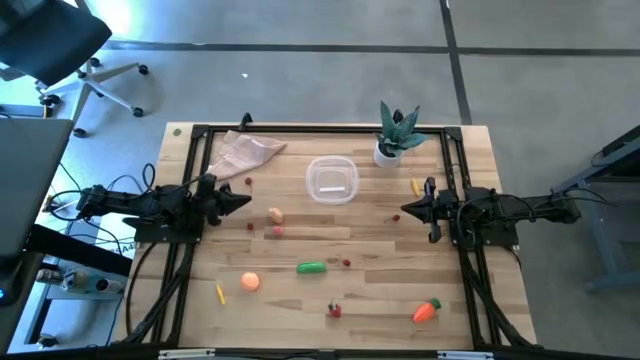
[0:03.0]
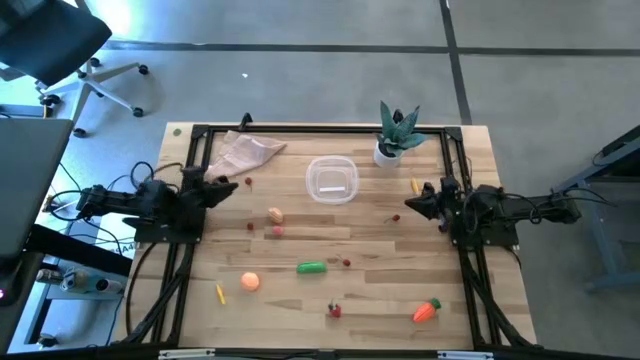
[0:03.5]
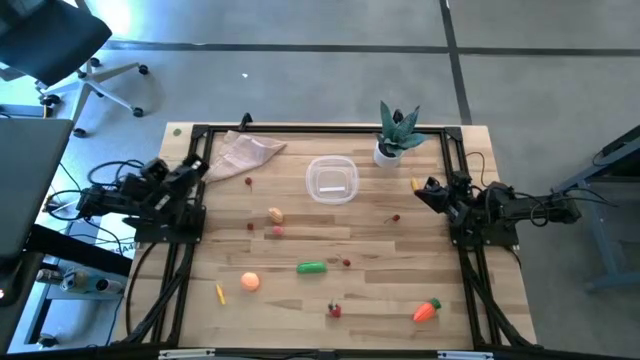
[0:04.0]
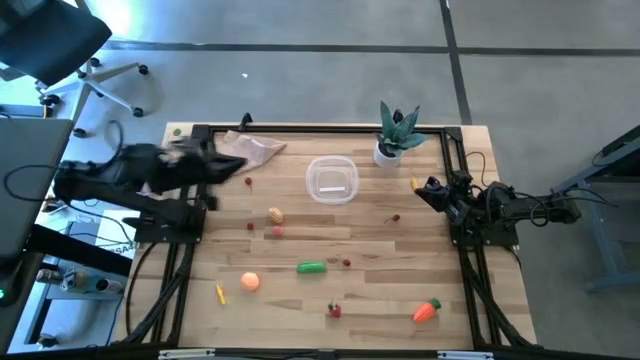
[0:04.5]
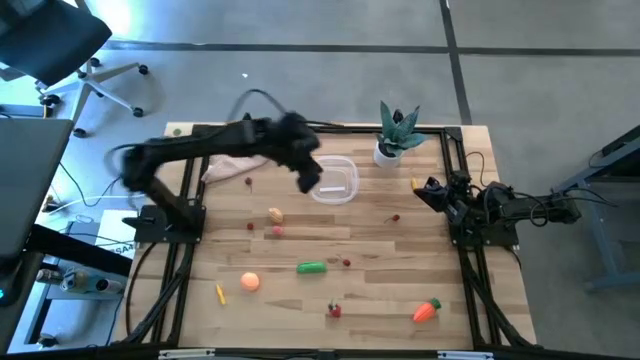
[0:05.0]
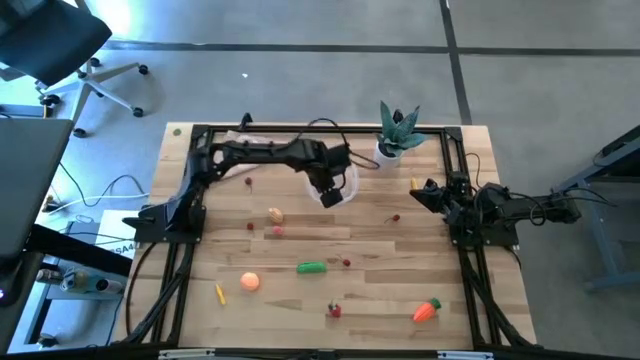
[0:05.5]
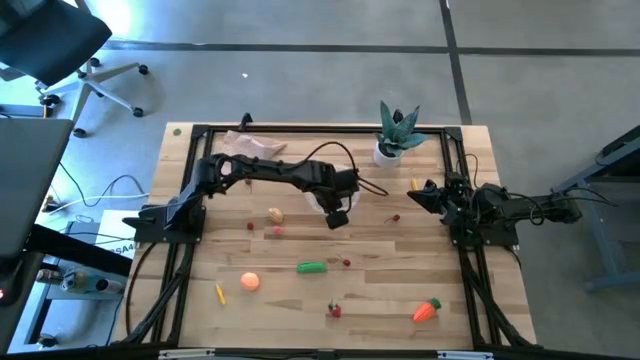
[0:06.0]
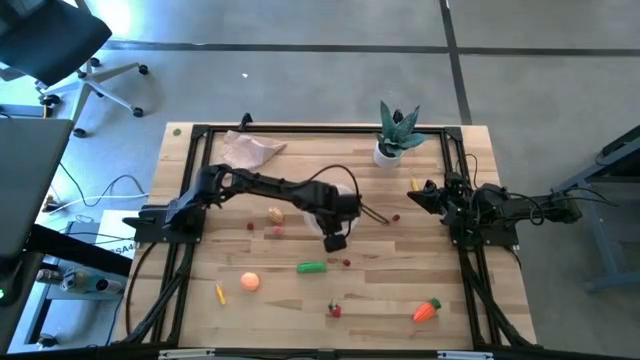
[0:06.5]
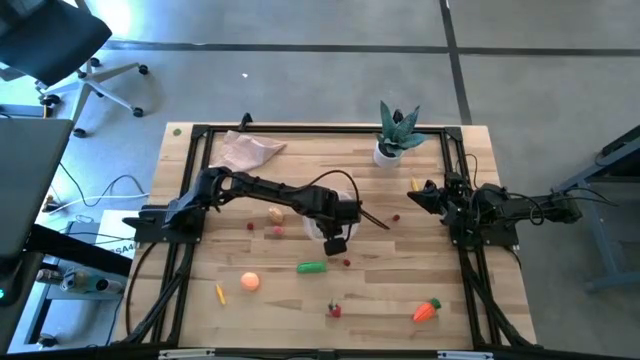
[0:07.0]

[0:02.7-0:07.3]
Task: Pick and placing Produce into tupperware
Adjust the transparent bin

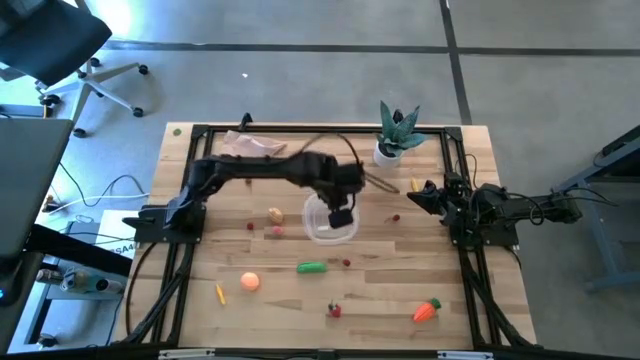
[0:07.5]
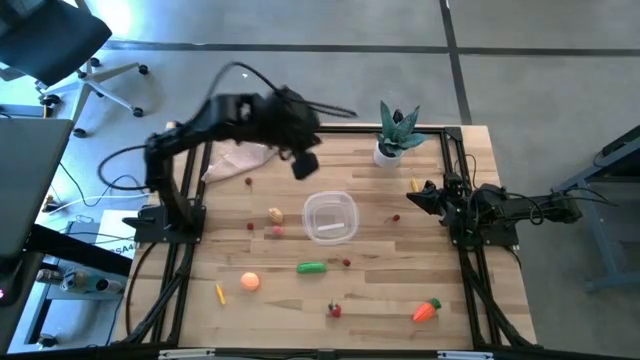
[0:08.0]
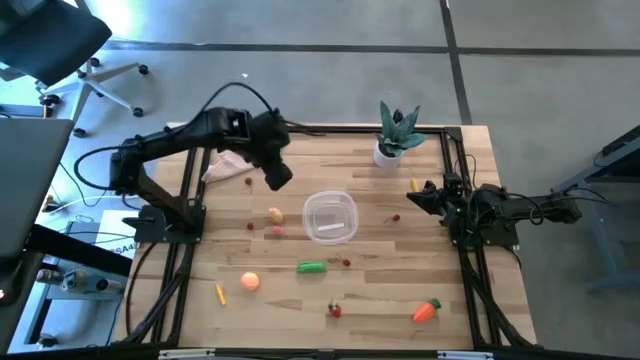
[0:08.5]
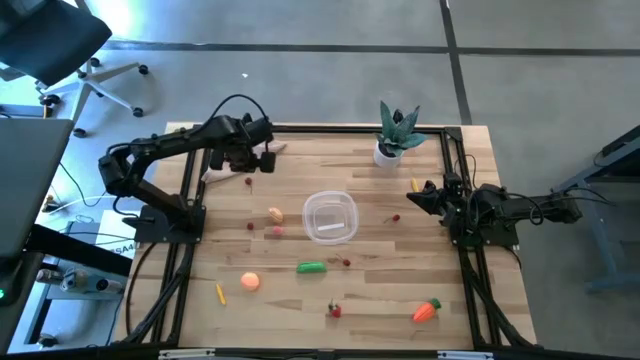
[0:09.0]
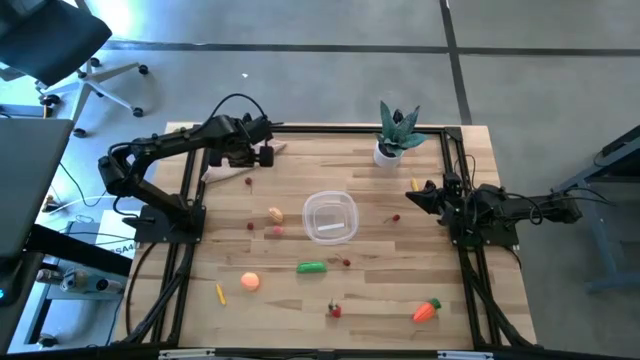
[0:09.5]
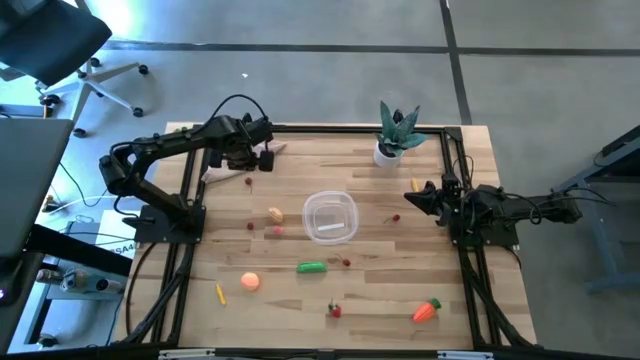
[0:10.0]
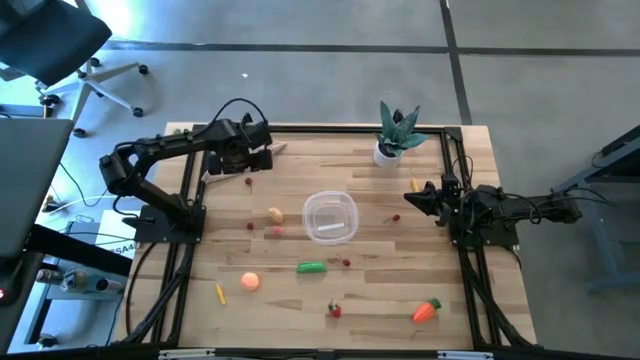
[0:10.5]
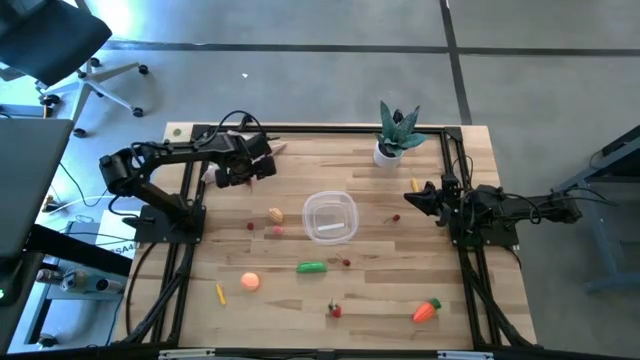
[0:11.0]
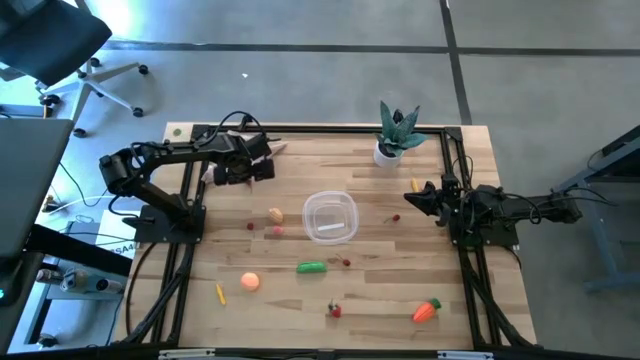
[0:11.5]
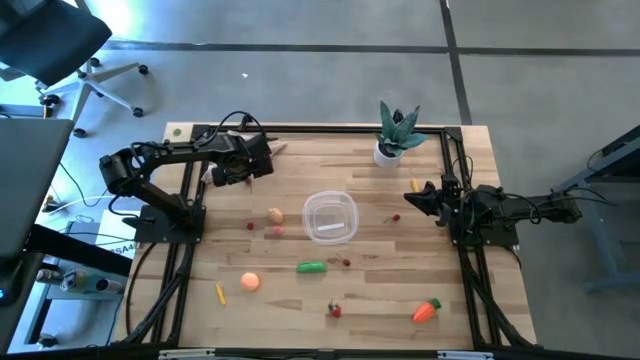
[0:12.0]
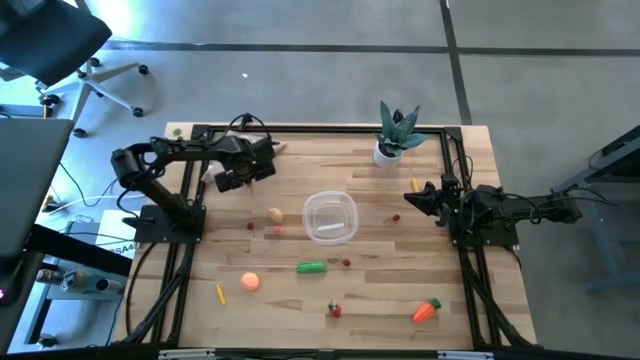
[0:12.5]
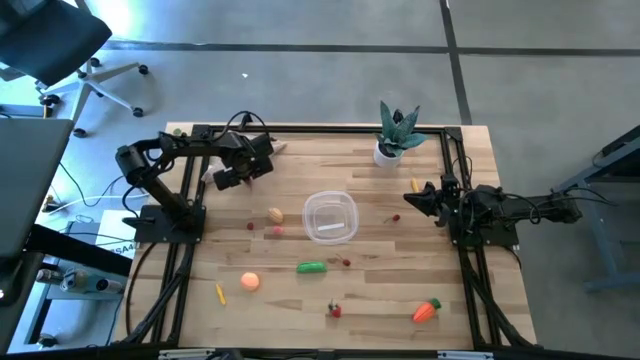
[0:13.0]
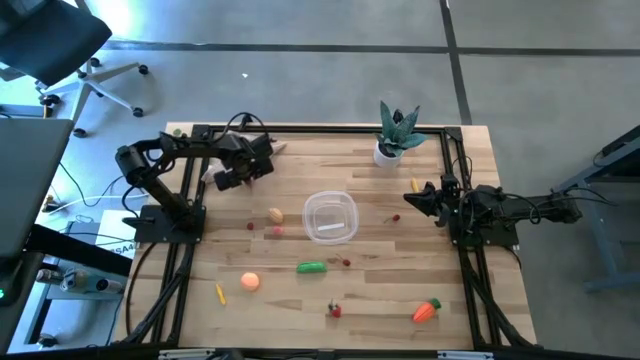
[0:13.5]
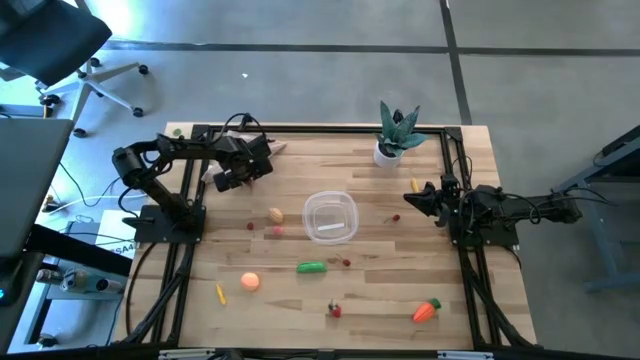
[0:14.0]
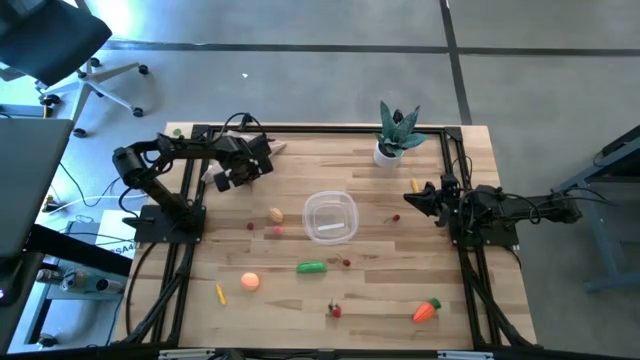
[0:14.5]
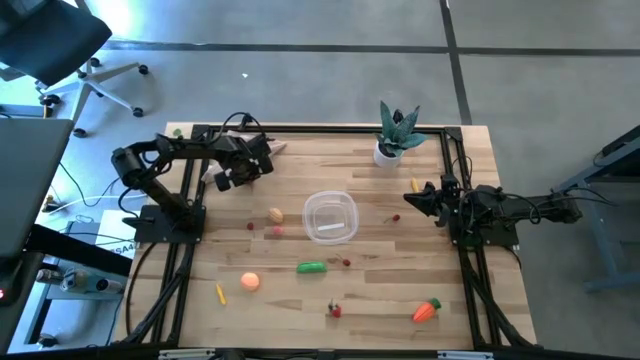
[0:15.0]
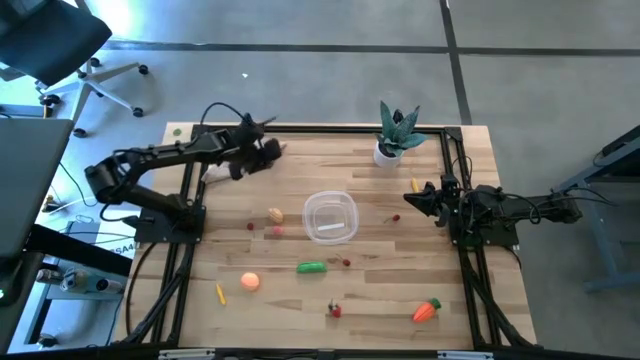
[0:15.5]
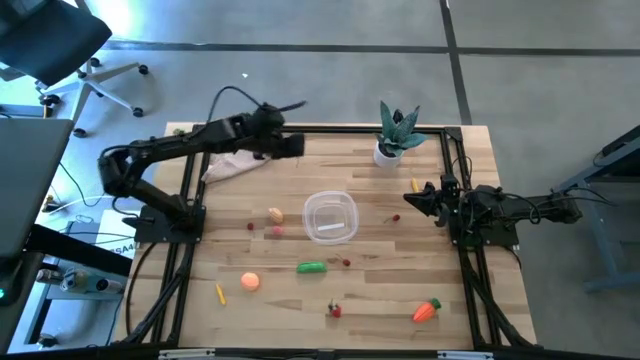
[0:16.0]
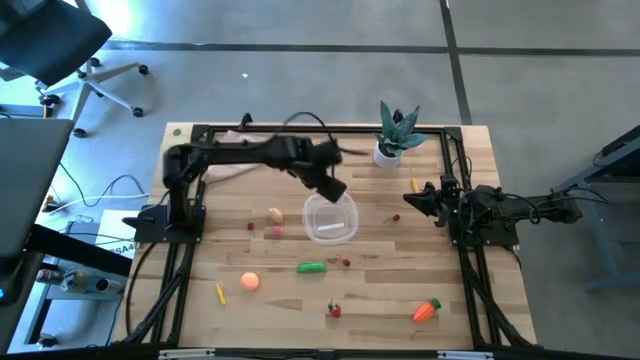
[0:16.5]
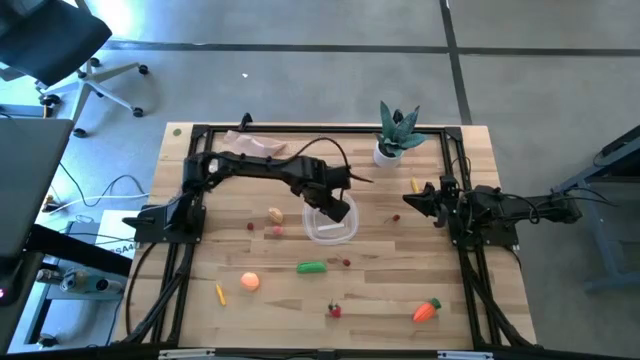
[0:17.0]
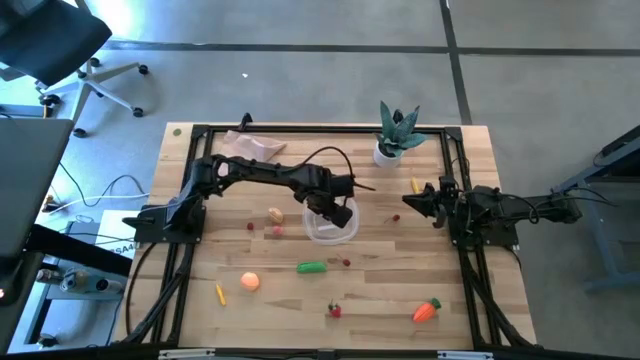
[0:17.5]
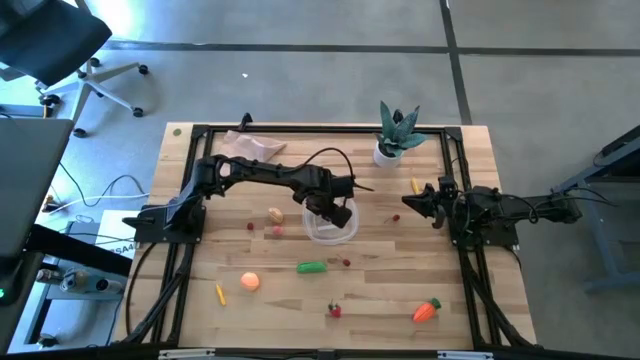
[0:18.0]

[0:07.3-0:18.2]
Put the red cherry into the transparent bin

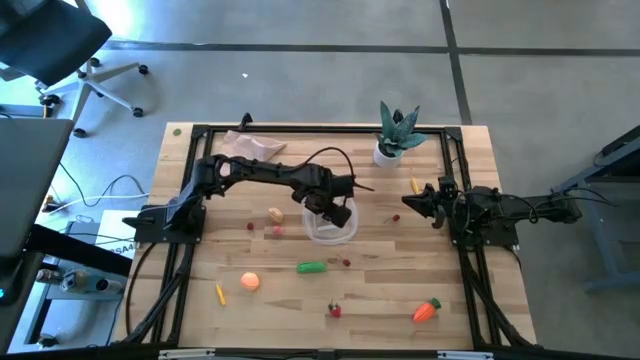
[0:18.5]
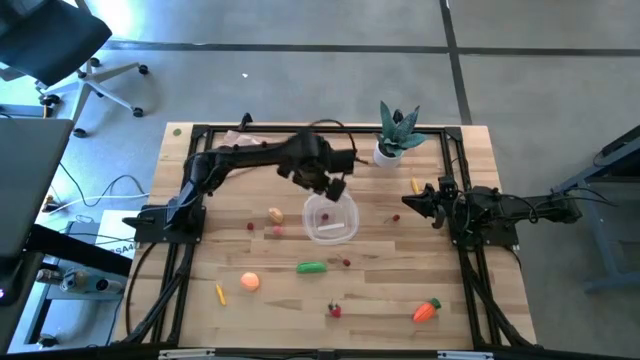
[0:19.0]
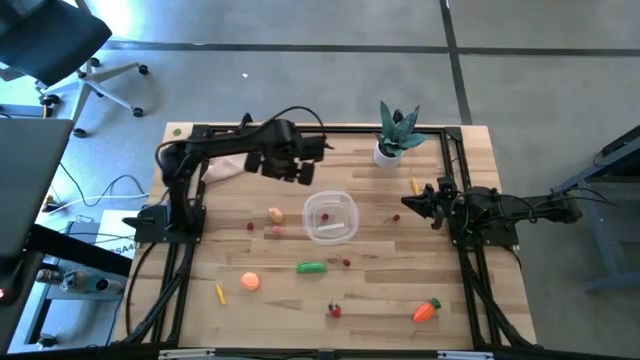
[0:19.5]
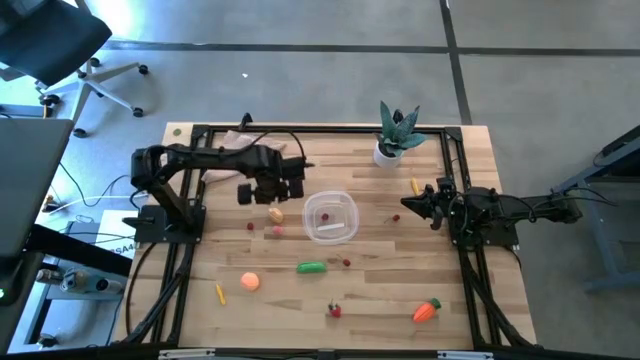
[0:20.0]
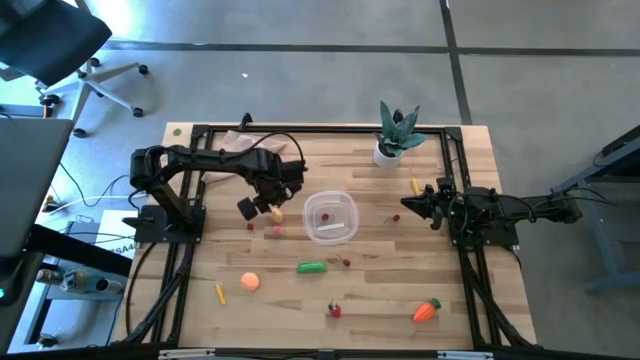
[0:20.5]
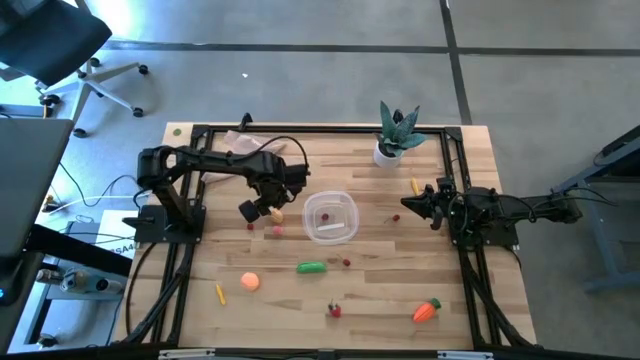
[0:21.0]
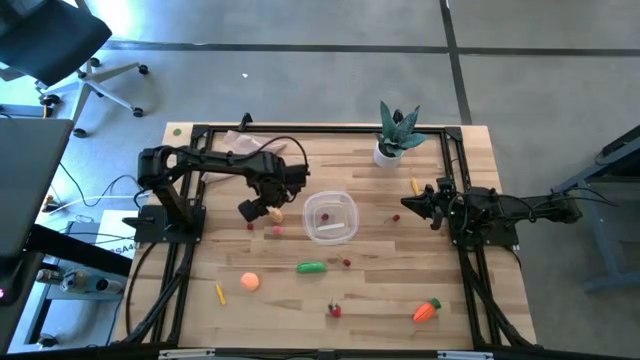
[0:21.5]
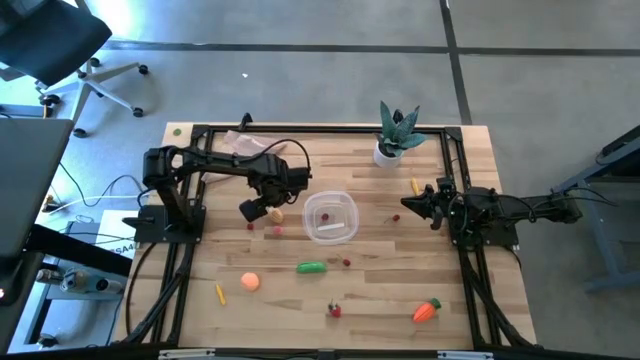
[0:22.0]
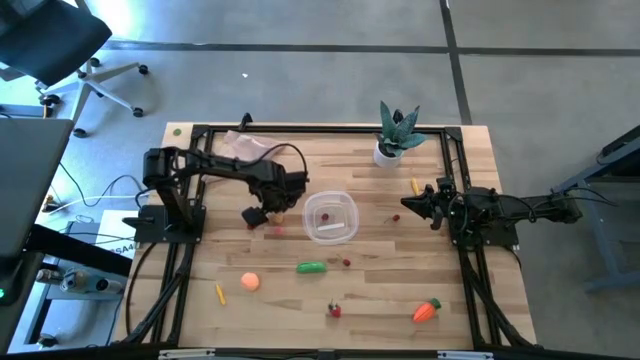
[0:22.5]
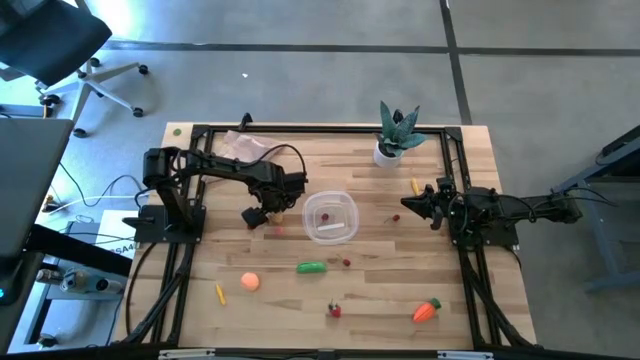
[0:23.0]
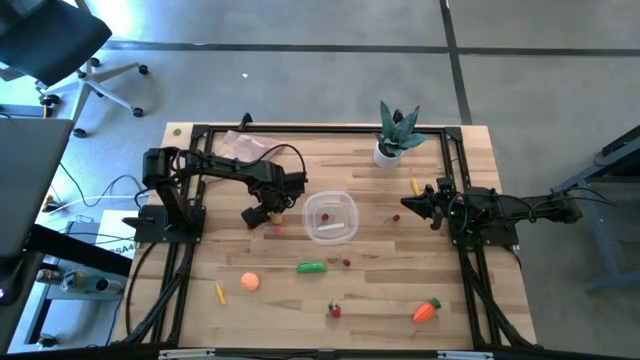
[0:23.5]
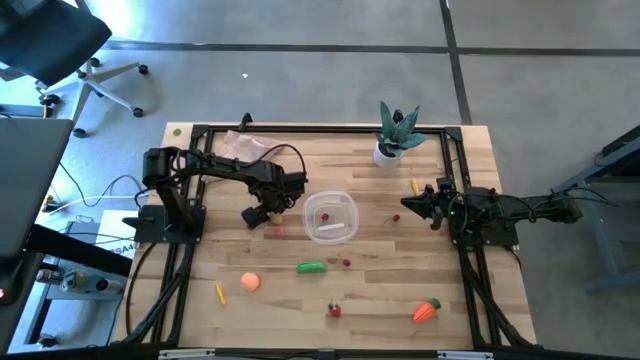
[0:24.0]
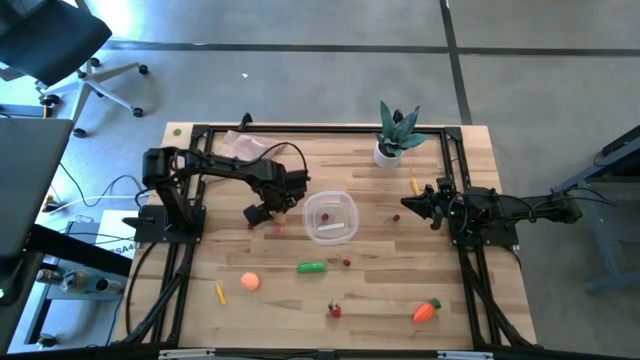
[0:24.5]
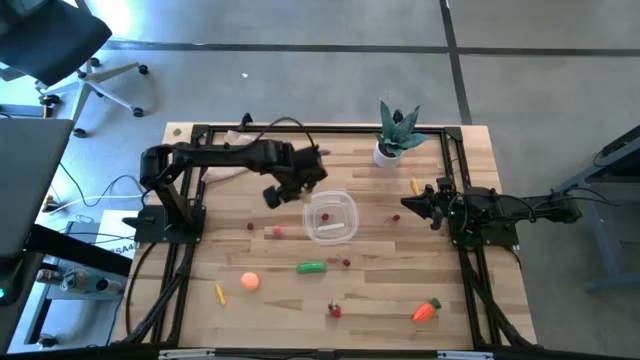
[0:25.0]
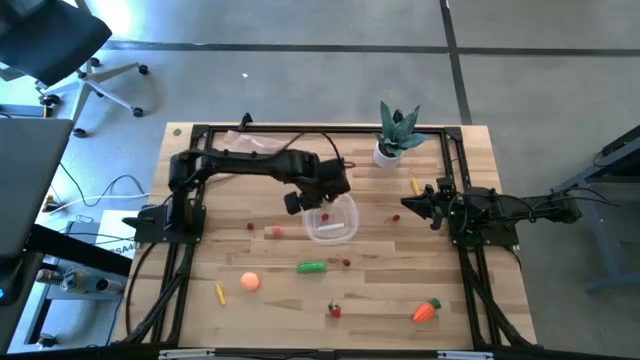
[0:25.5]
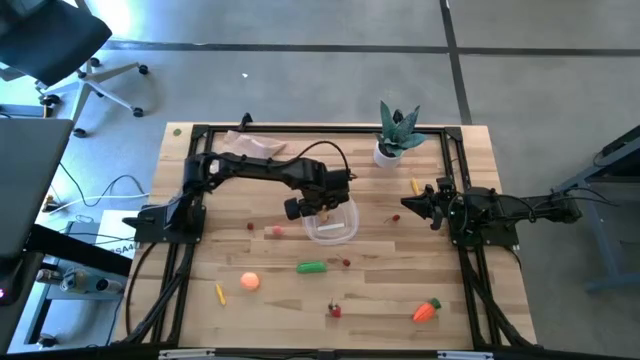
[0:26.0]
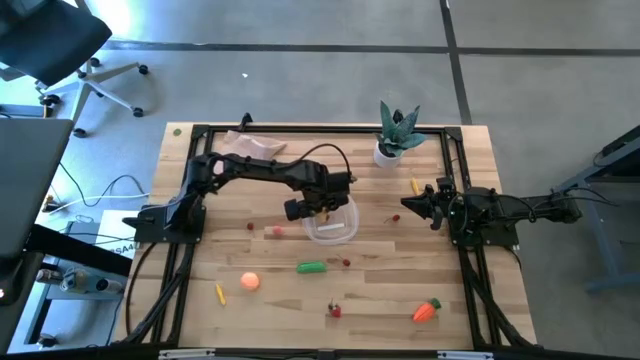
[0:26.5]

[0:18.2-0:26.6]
Put the potato into the transparent bin
